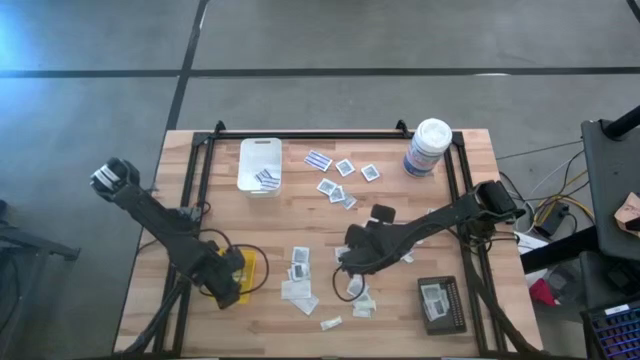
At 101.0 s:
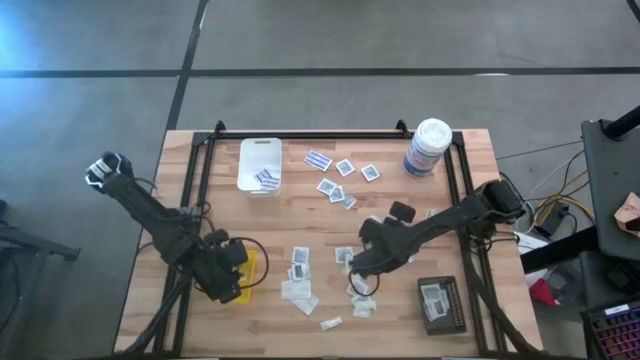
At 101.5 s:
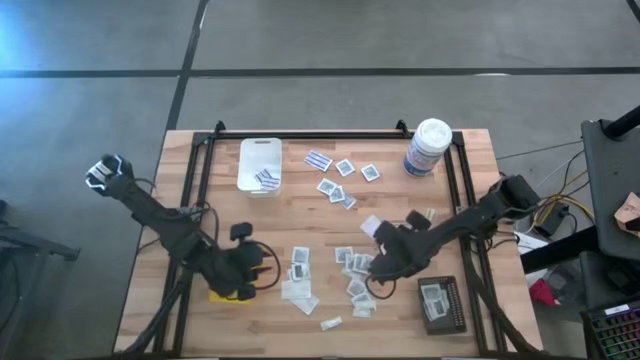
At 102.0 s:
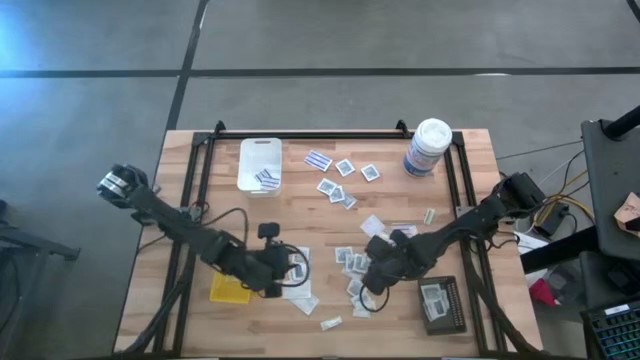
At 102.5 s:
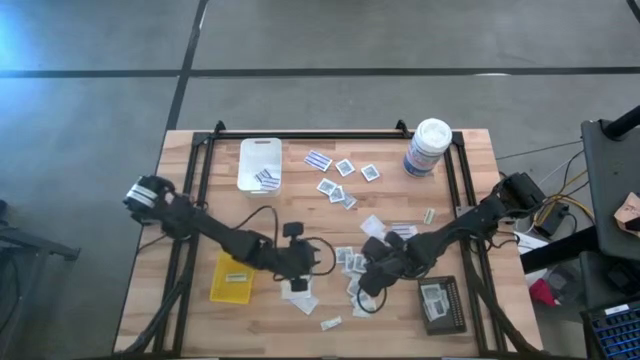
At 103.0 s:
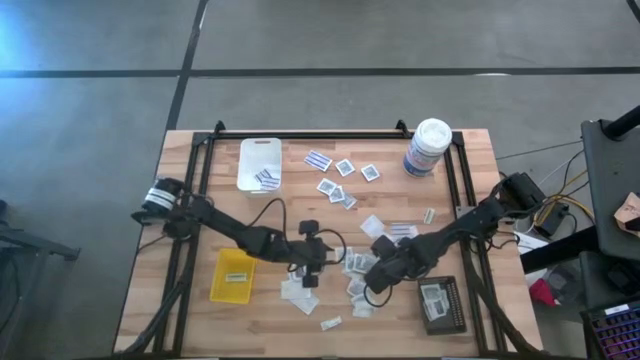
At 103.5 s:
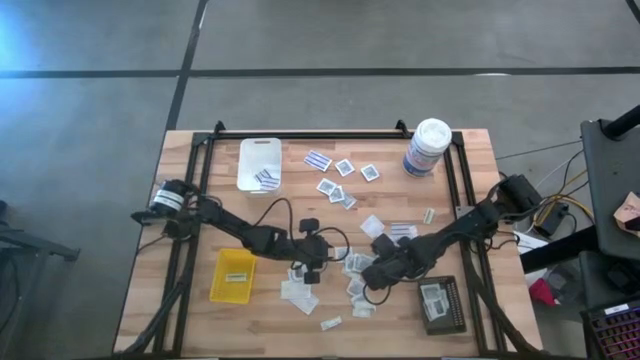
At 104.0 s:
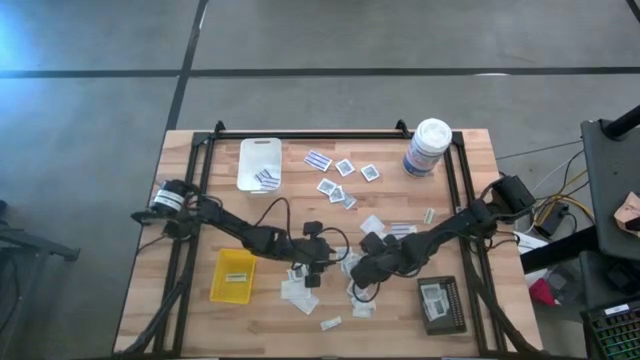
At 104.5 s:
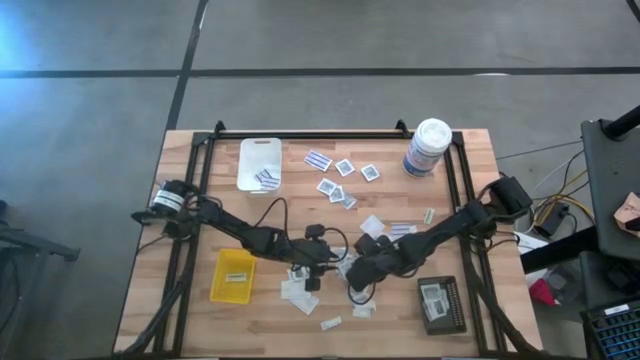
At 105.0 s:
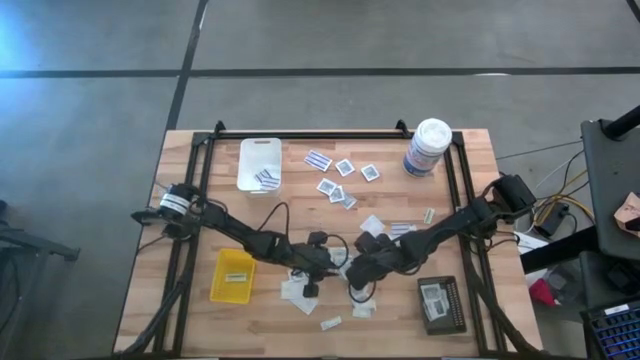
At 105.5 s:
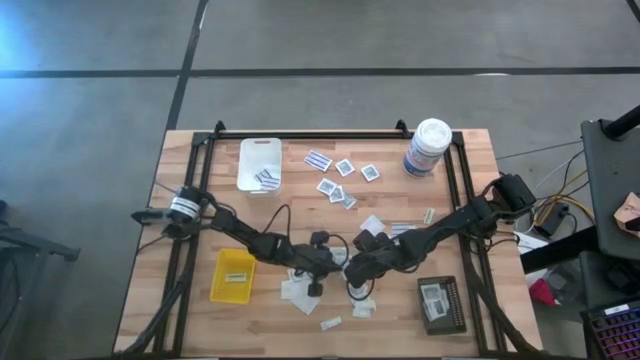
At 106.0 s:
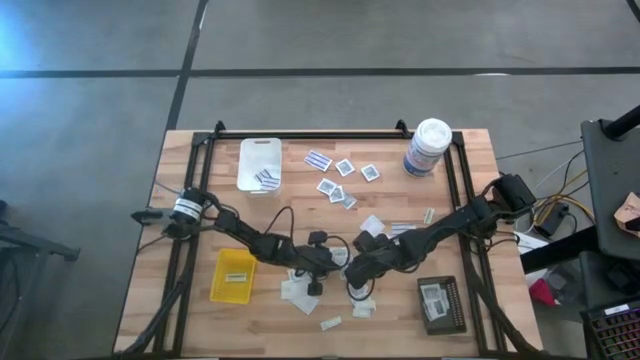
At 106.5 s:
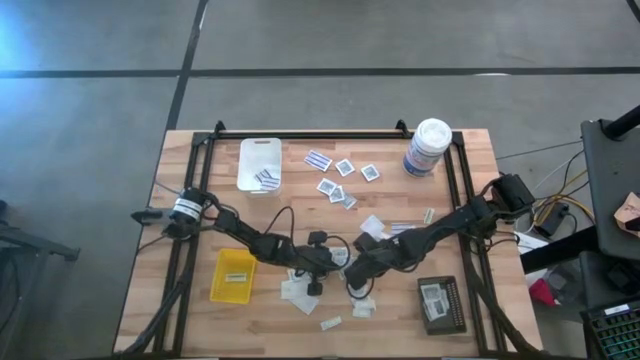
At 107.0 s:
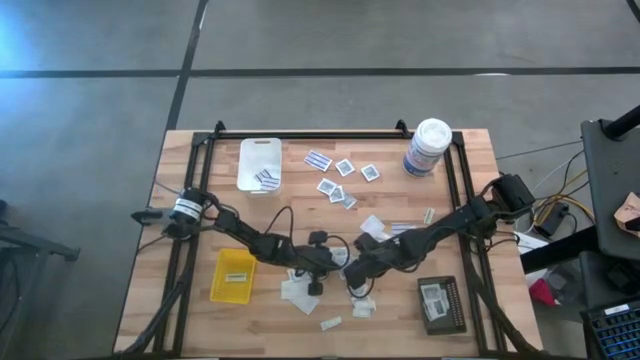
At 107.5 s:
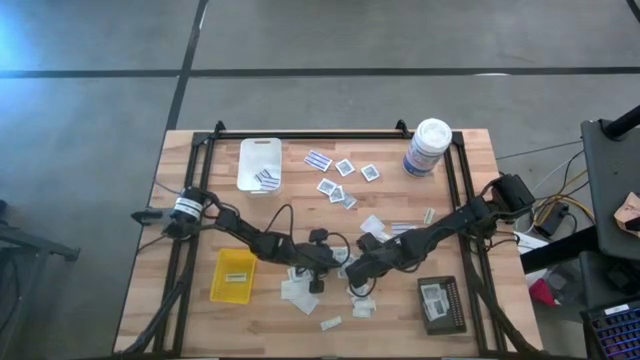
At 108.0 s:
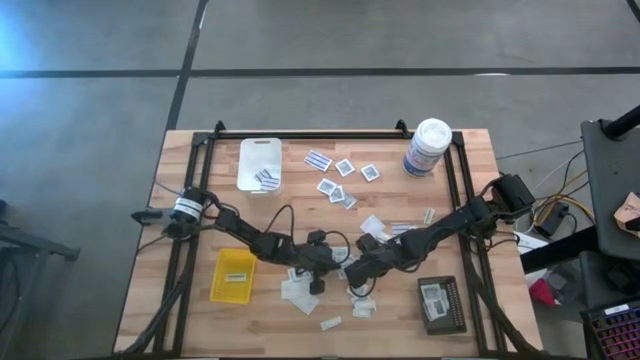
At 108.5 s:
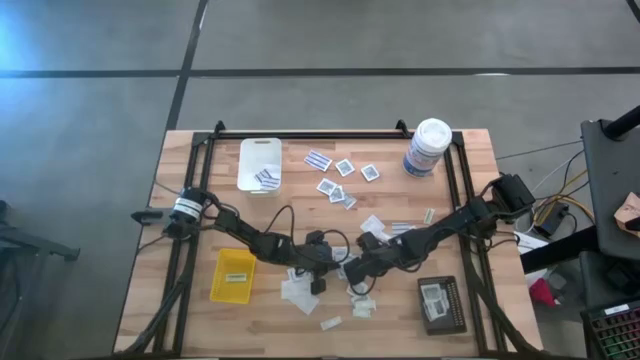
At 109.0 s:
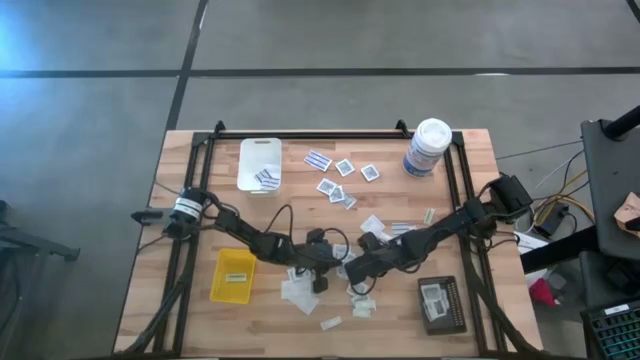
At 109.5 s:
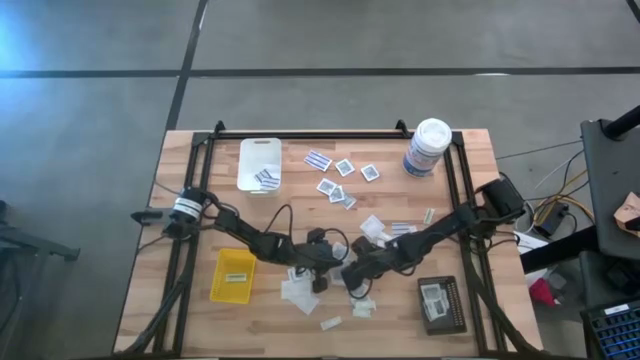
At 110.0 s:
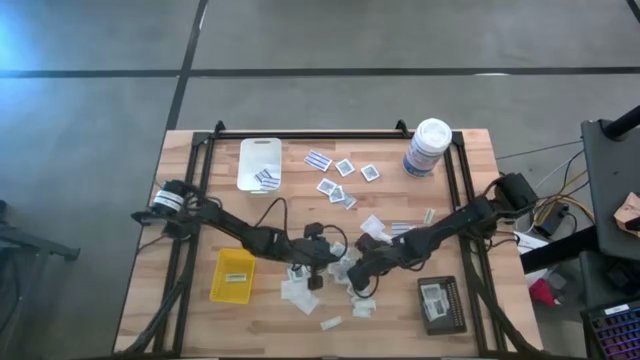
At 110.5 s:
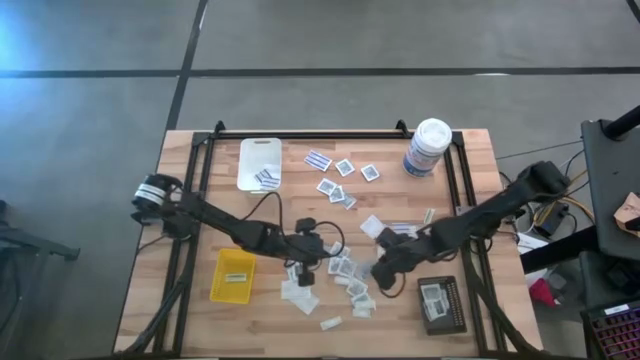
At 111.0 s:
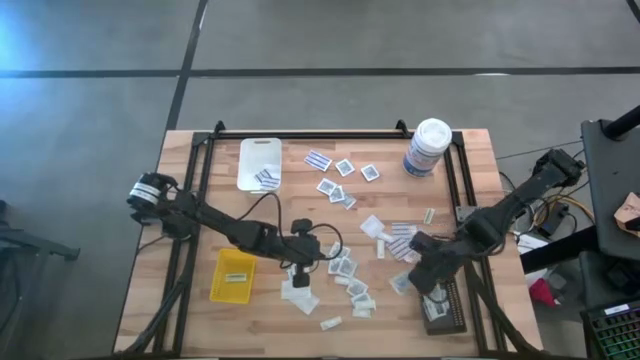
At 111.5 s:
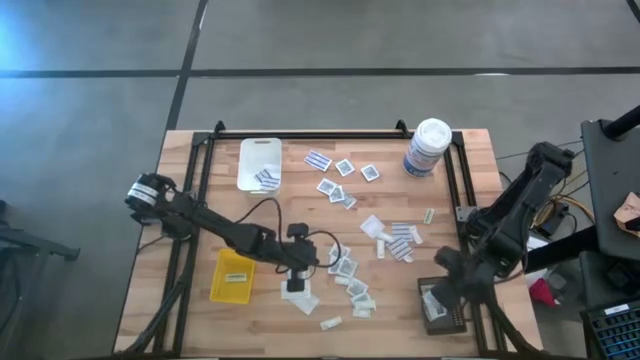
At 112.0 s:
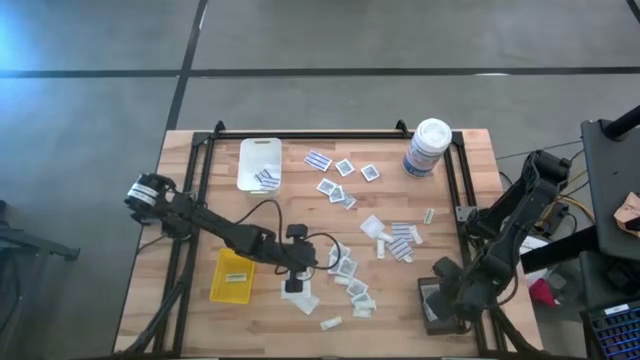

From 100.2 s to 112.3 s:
Task: Pick & Place First Aid Supplies
Put the towelette pack into the black bin

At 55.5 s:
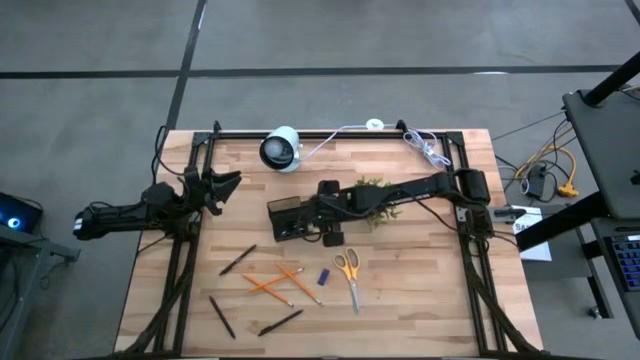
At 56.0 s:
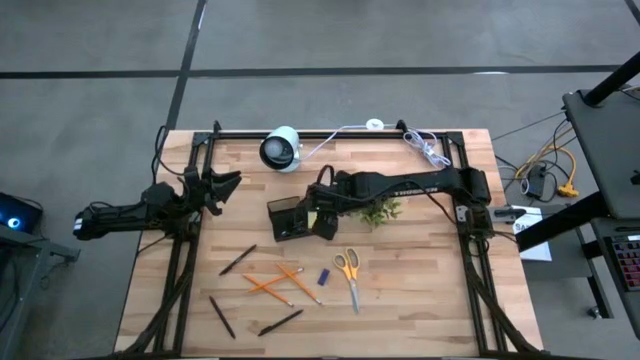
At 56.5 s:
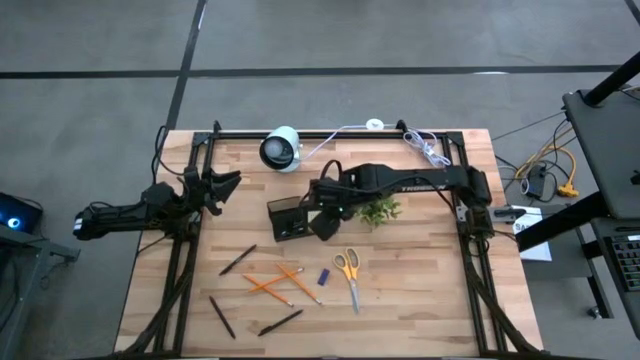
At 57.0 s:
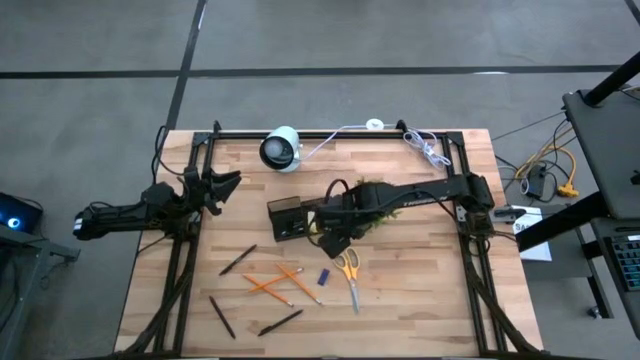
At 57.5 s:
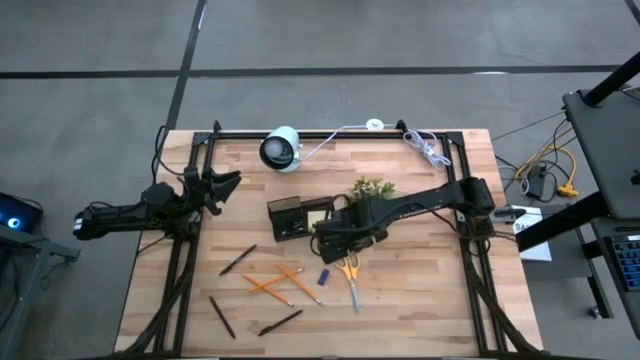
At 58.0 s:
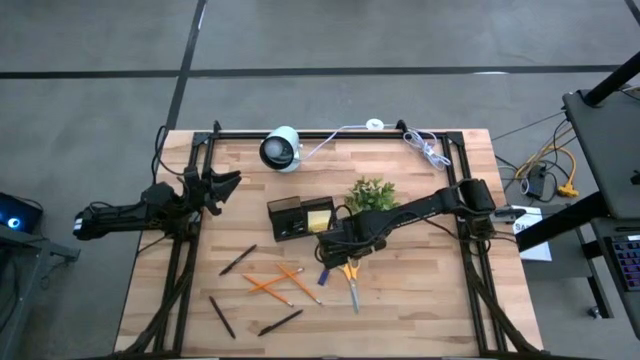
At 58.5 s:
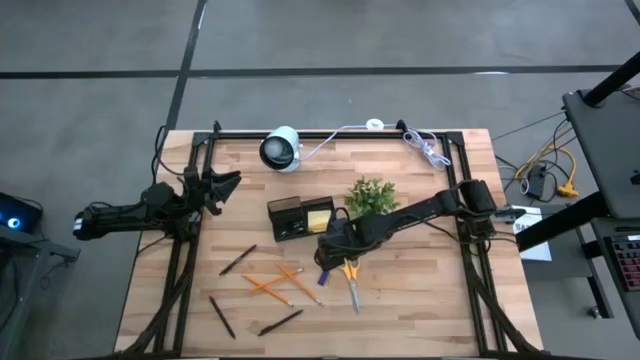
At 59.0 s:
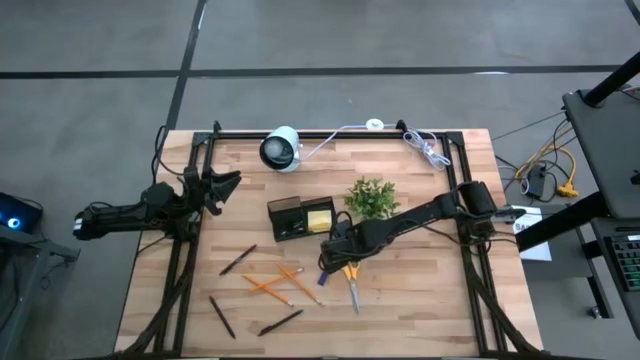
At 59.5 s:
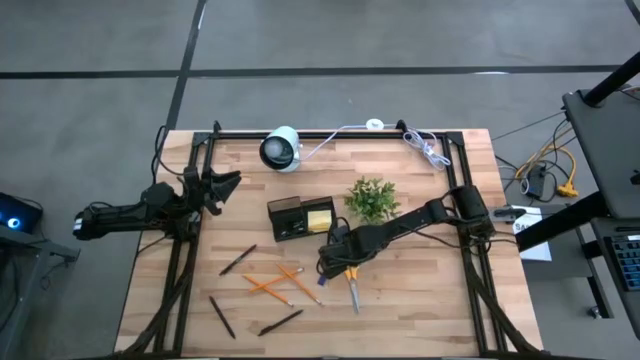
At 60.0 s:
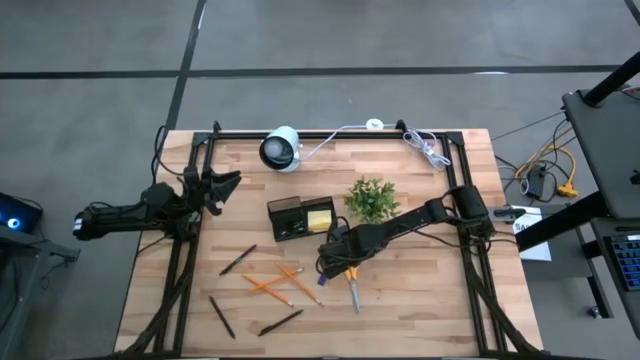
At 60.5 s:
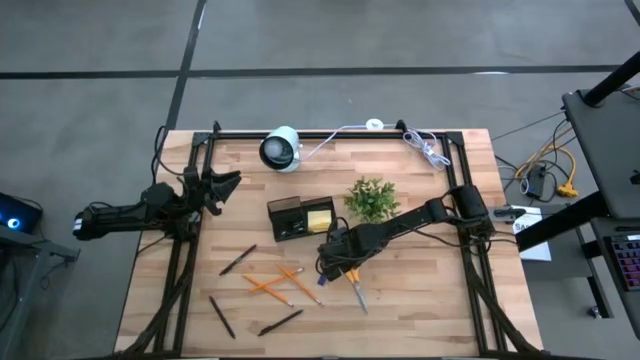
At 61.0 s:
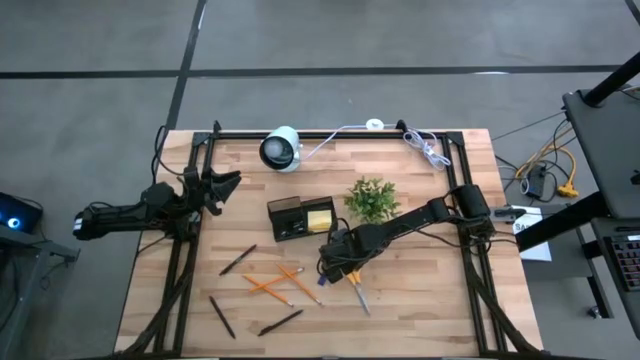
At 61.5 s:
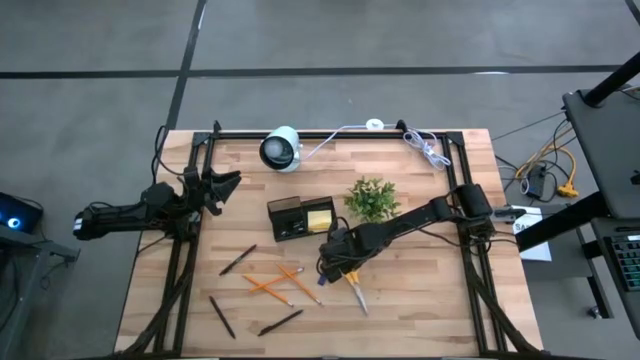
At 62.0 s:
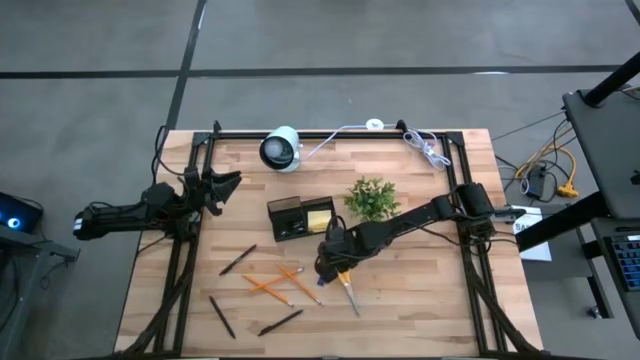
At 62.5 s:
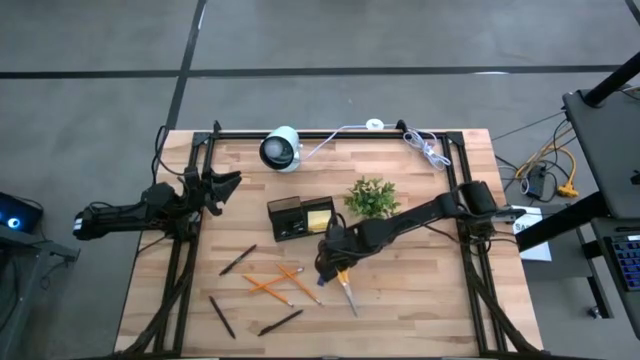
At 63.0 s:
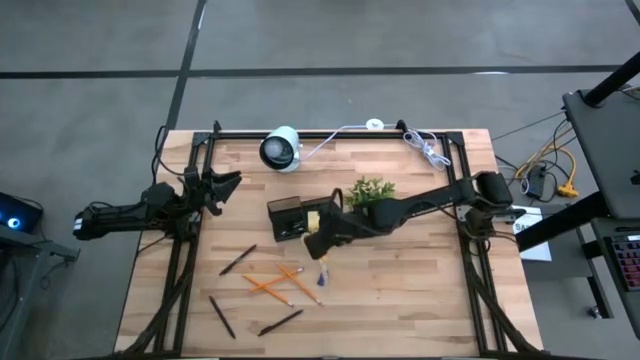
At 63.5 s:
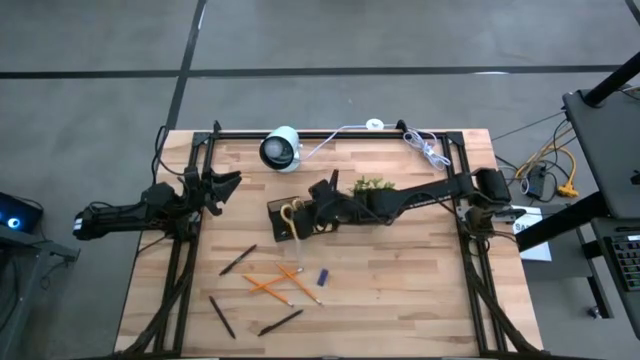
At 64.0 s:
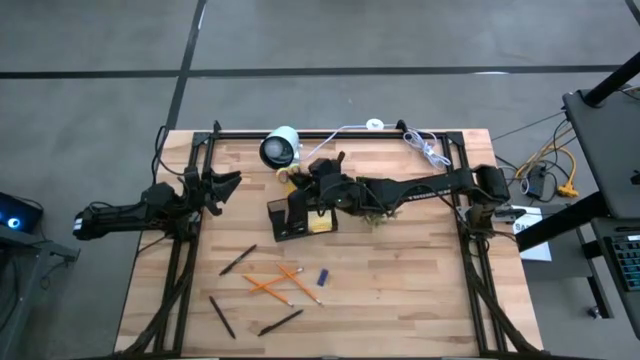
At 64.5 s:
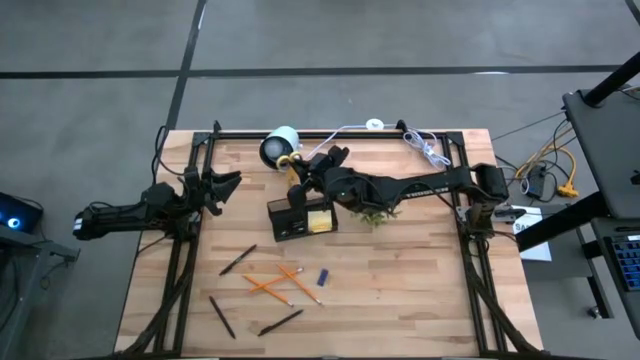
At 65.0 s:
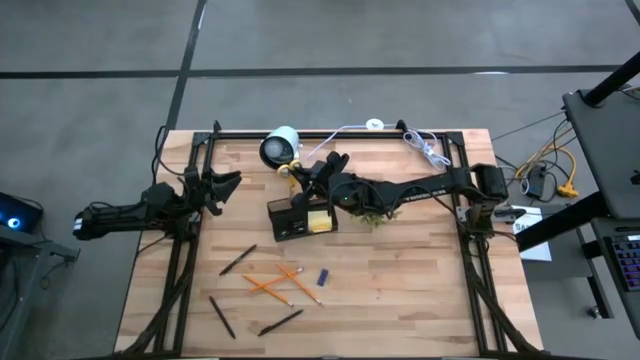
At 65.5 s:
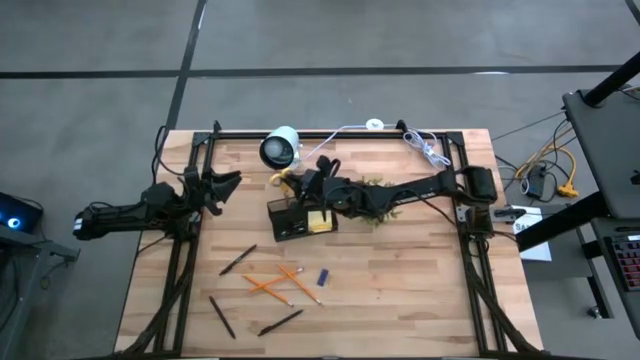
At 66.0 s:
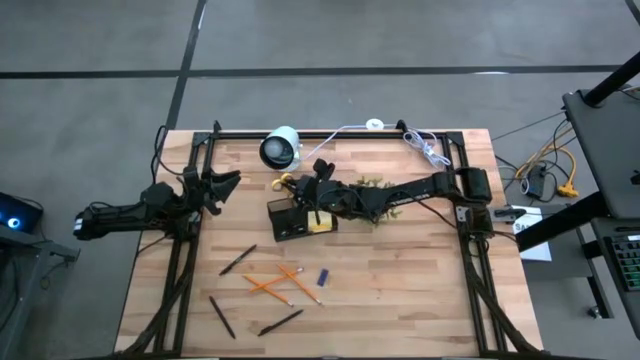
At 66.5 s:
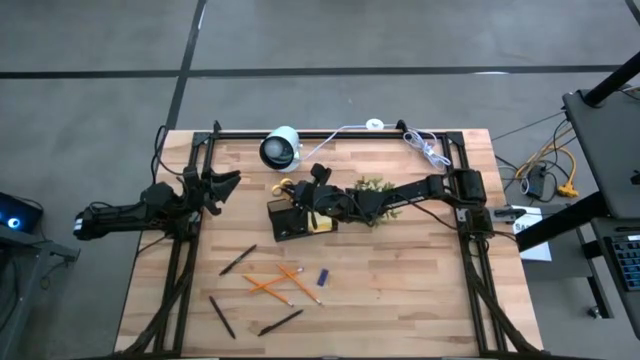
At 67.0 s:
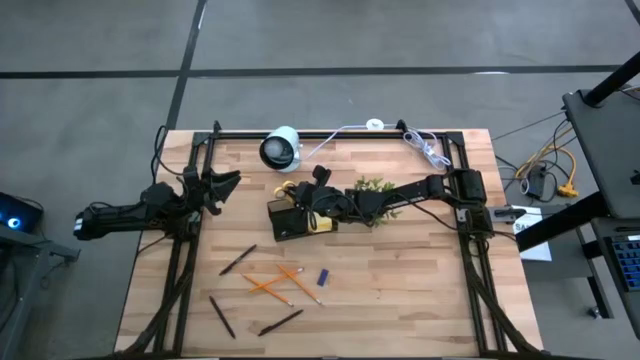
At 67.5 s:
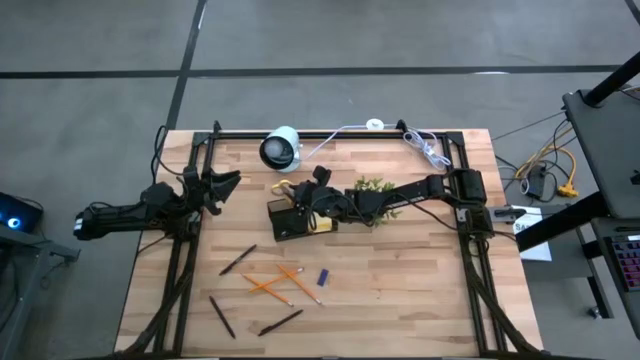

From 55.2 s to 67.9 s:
Task: Pick and place office supplies into organizer
Put the yellow scissors in the black desk organizer
